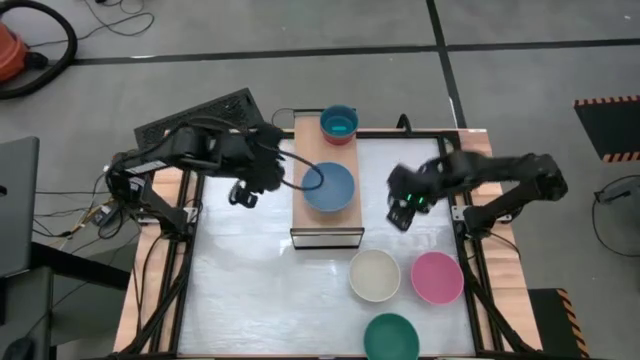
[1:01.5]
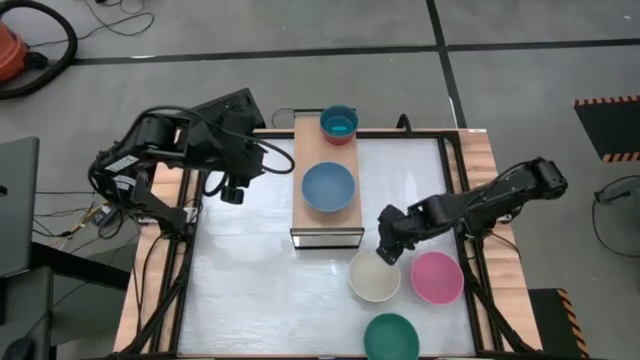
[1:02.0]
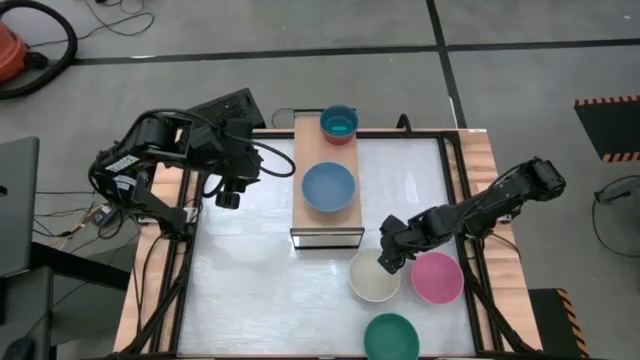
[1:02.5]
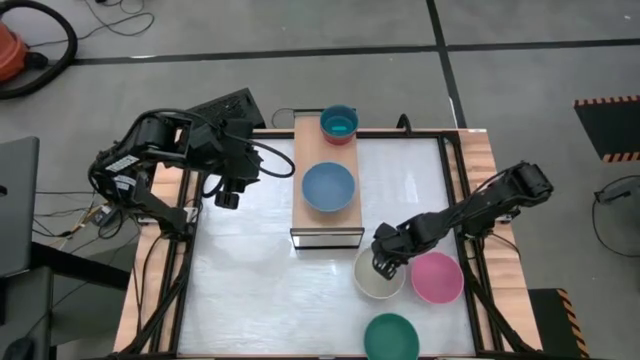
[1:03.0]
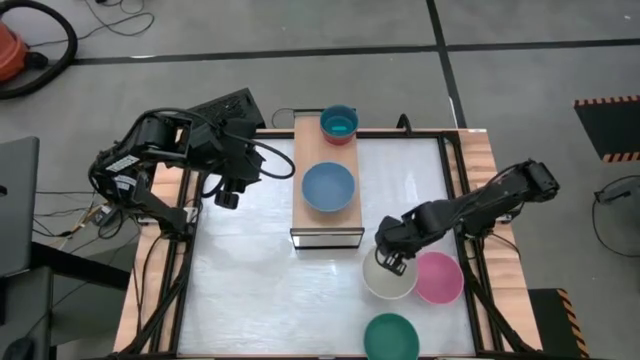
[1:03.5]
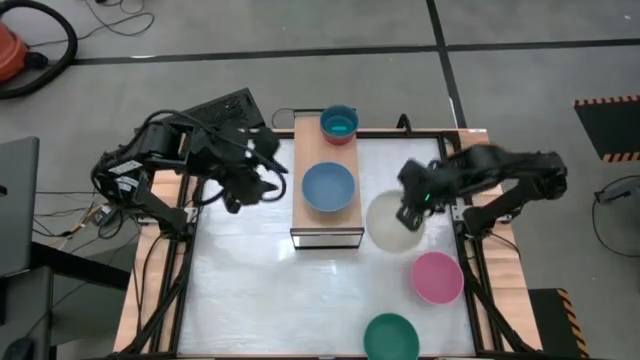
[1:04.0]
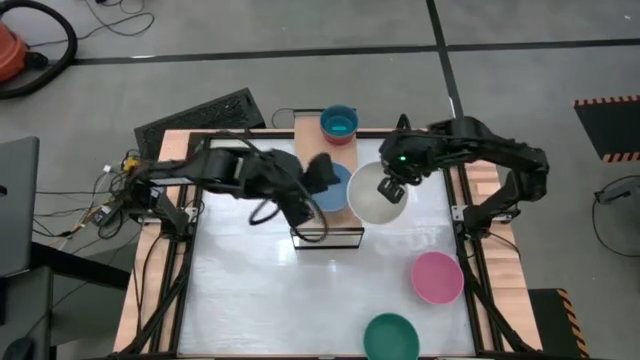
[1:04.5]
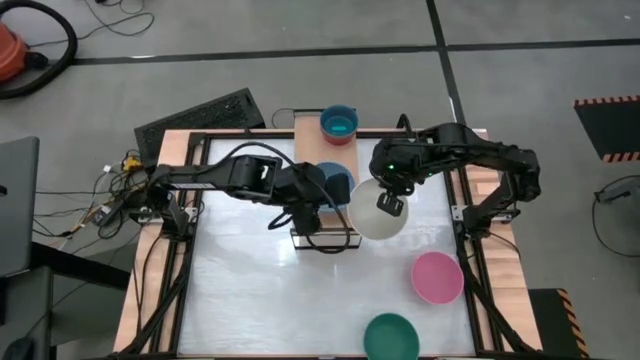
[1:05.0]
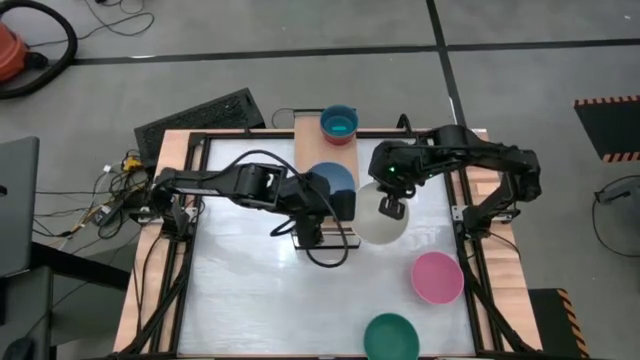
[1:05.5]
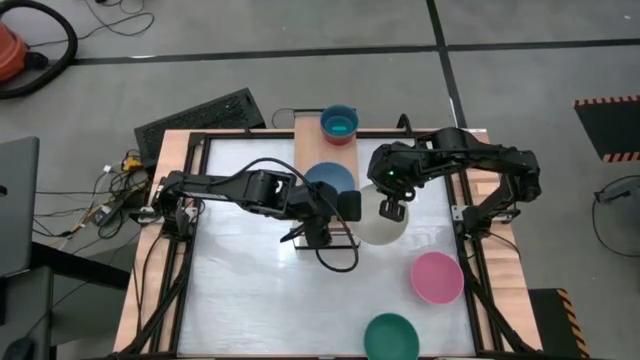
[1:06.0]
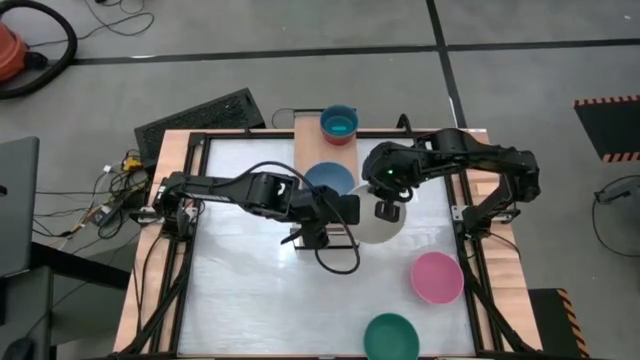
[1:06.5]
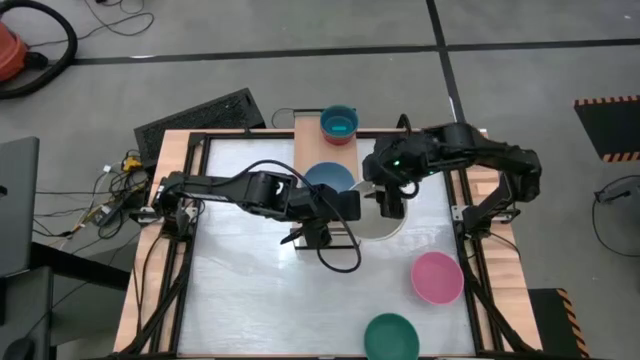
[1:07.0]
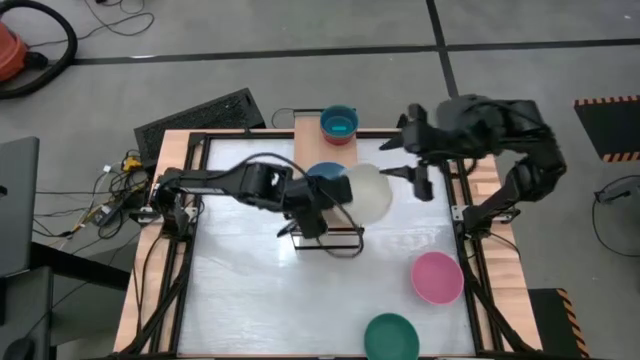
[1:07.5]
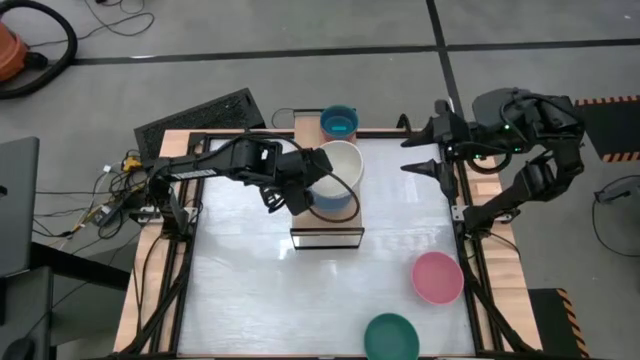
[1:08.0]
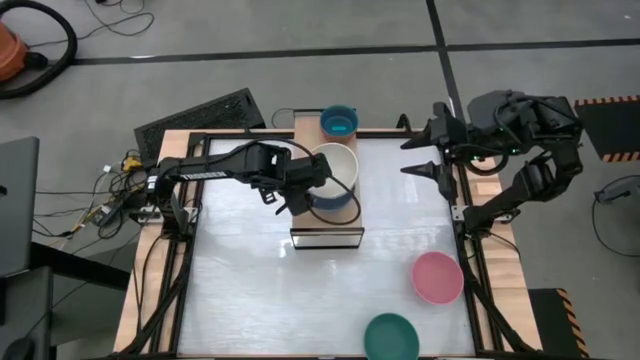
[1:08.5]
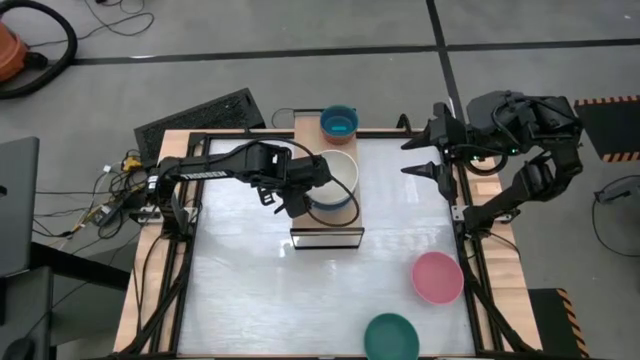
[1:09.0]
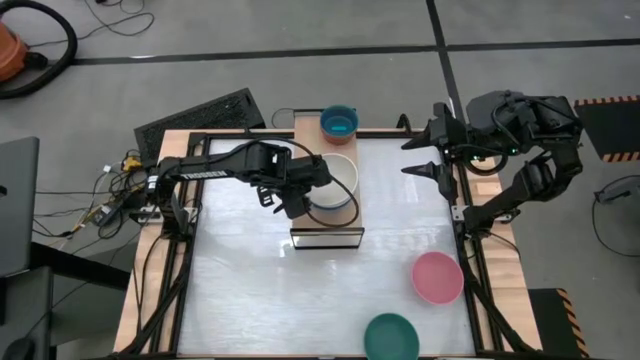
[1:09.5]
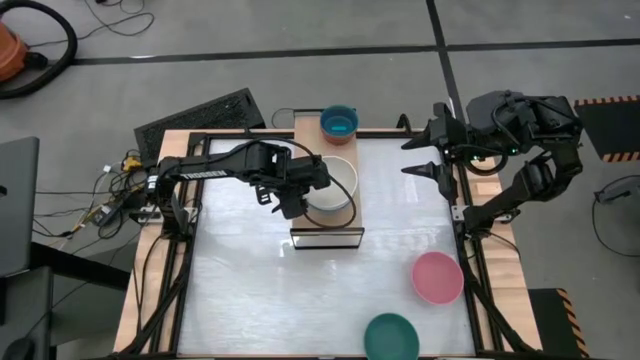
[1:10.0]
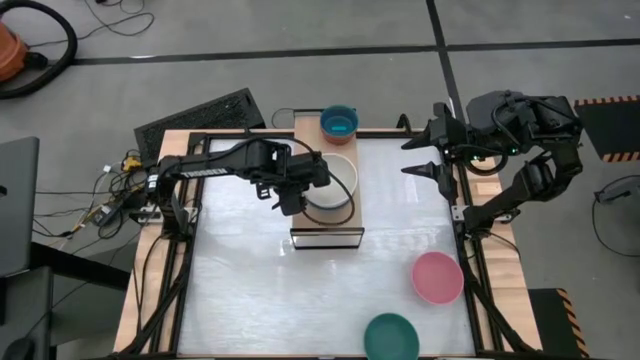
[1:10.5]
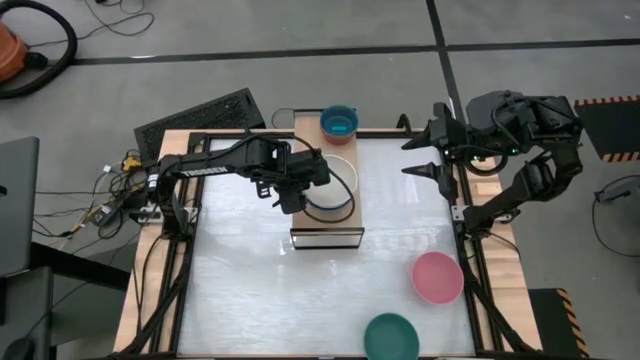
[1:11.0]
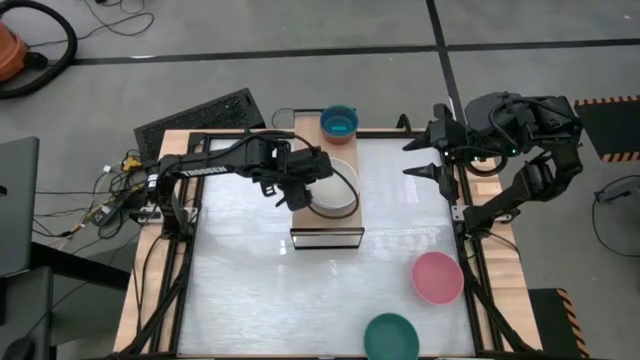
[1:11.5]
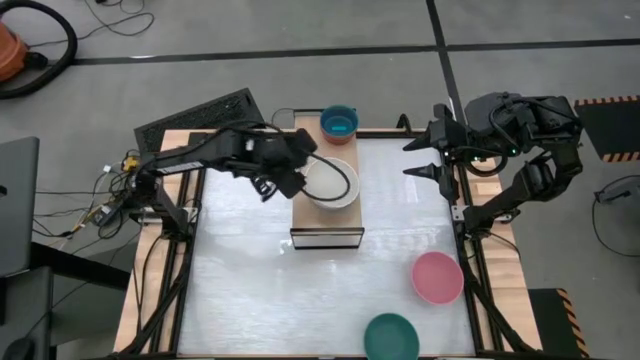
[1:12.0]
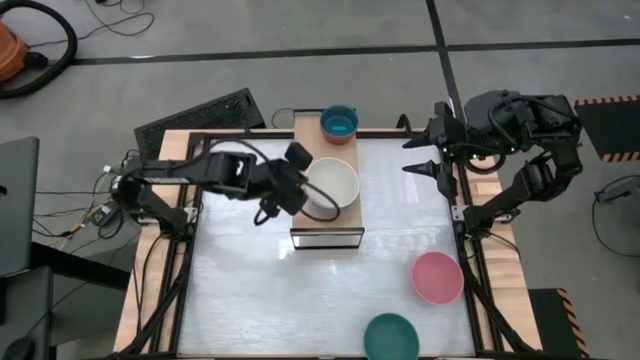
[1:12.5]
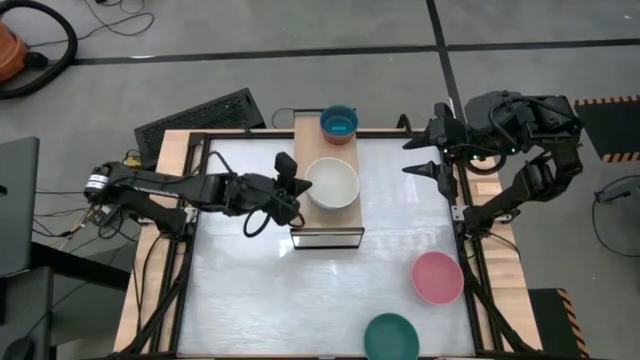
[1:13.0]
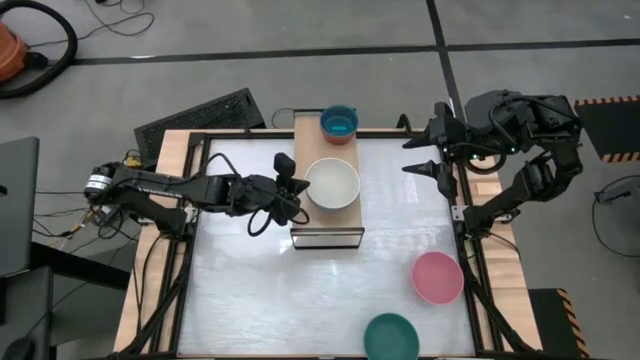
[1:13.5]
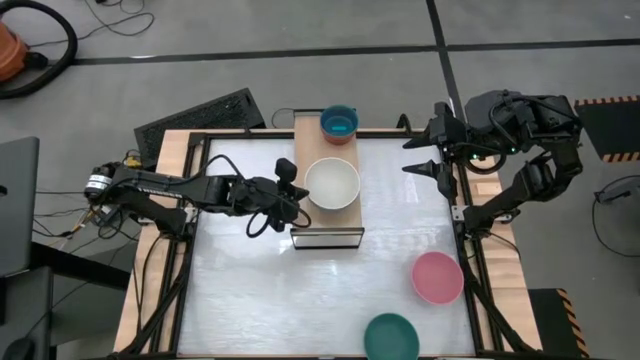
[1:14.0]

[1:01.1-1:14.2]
Task: Place and stack bowls onto a shelf
Stack the white bowl on top of the dark blue bowl on the shelf

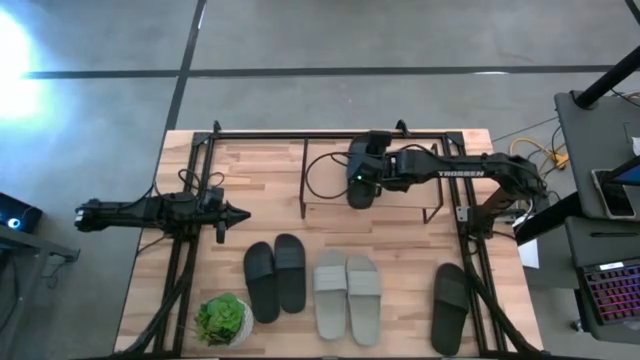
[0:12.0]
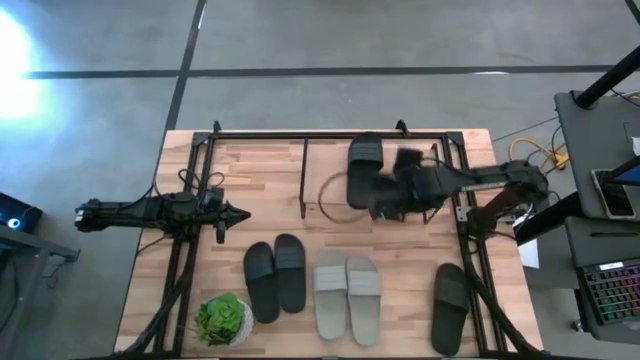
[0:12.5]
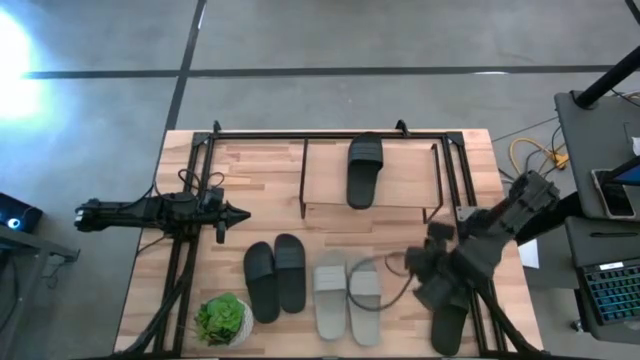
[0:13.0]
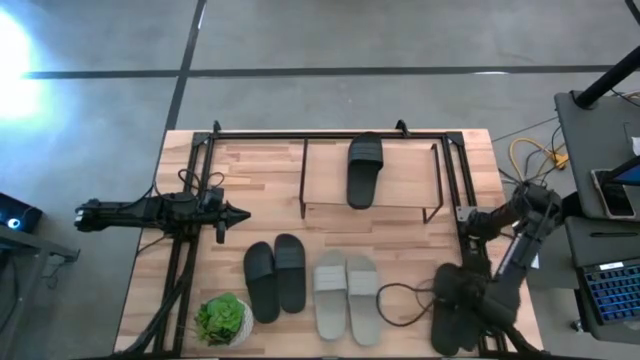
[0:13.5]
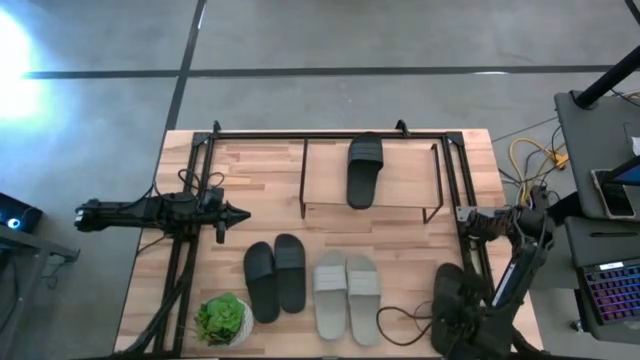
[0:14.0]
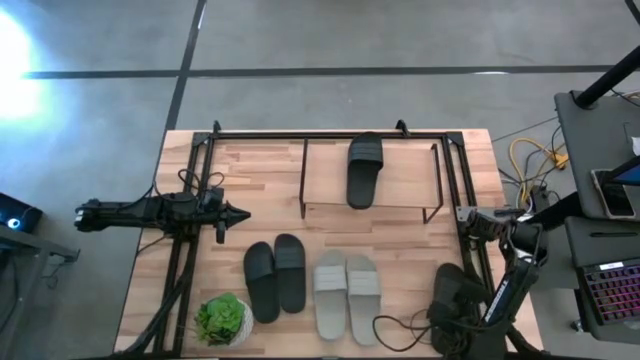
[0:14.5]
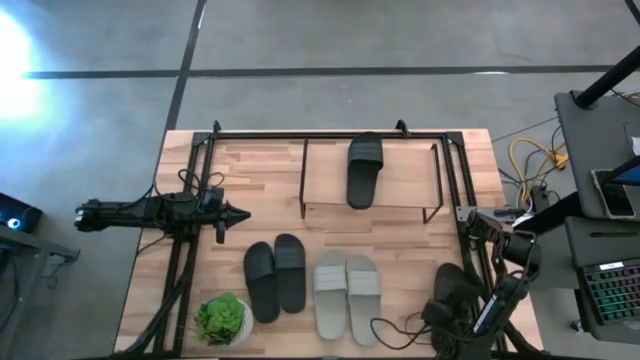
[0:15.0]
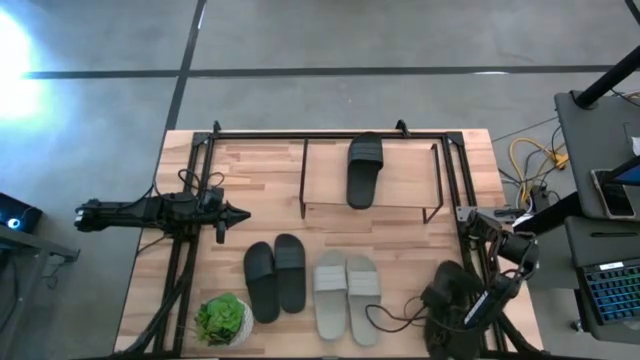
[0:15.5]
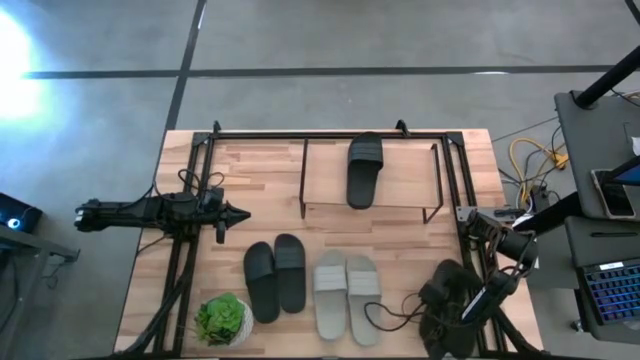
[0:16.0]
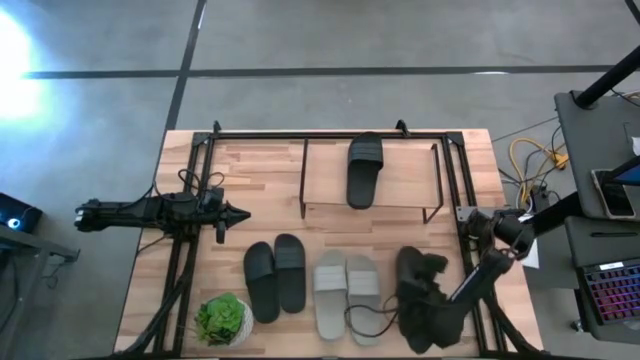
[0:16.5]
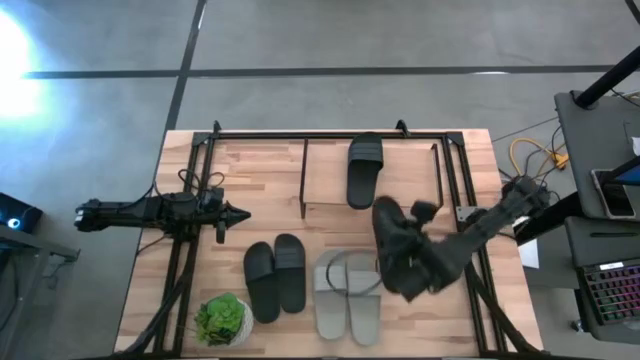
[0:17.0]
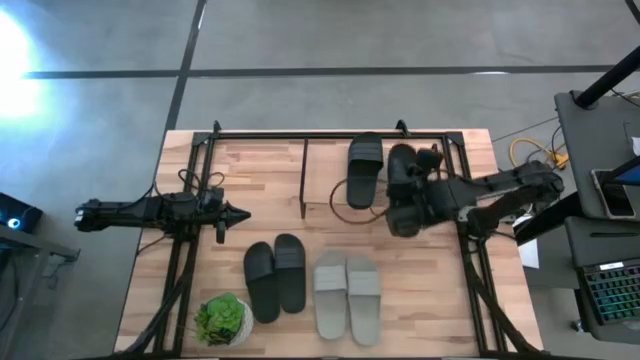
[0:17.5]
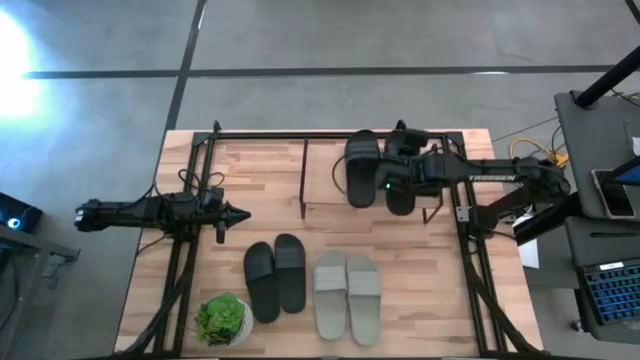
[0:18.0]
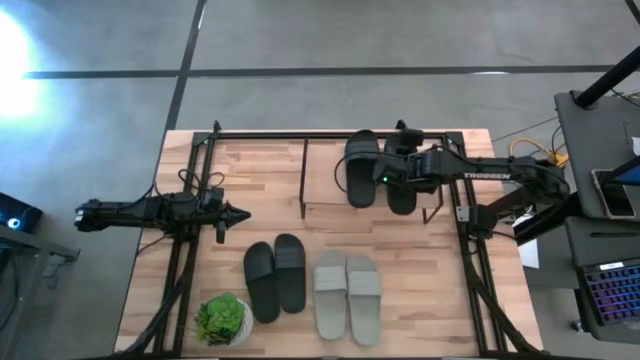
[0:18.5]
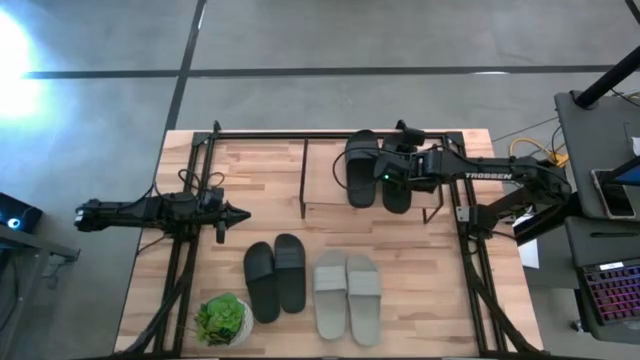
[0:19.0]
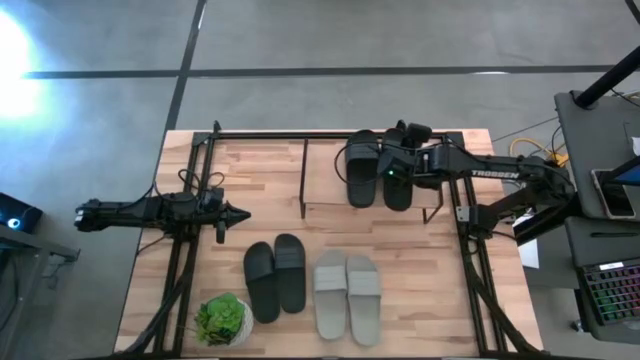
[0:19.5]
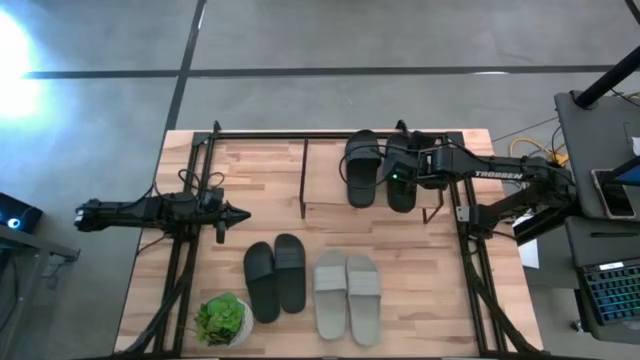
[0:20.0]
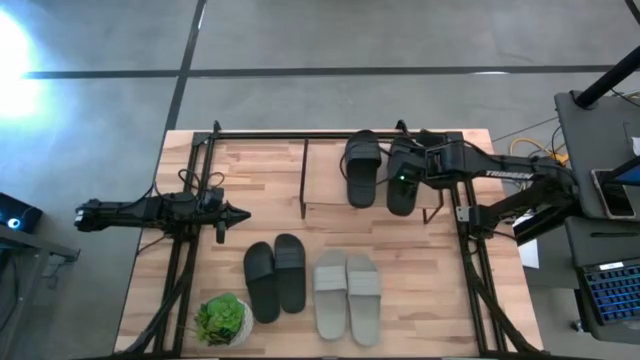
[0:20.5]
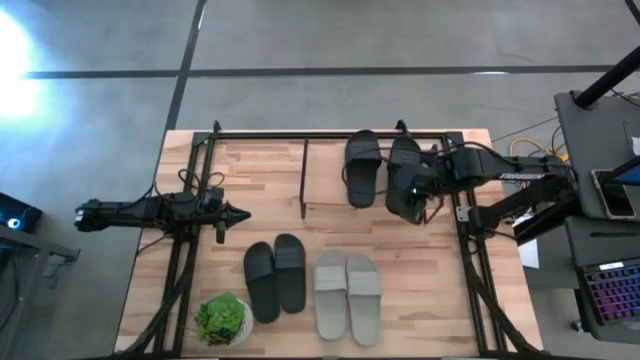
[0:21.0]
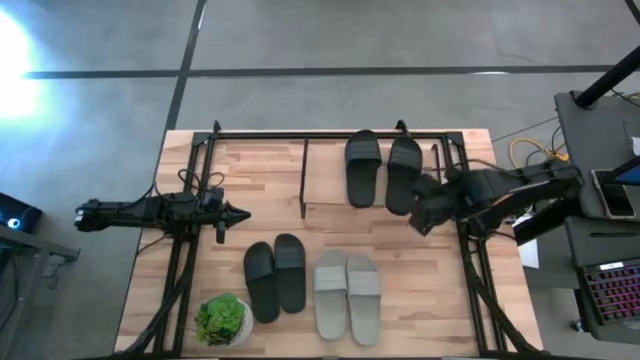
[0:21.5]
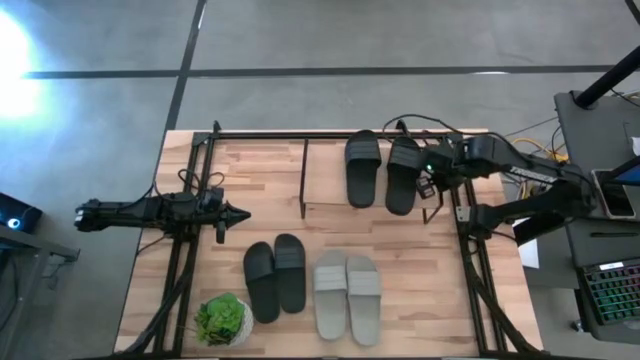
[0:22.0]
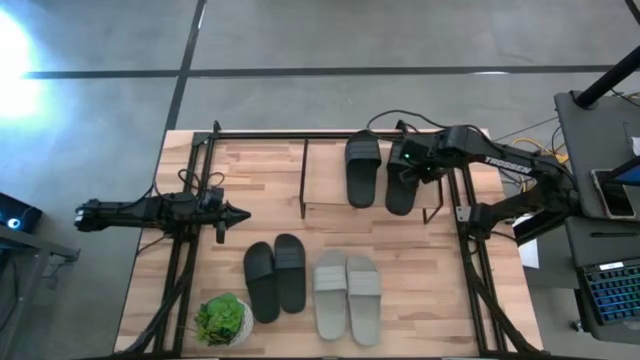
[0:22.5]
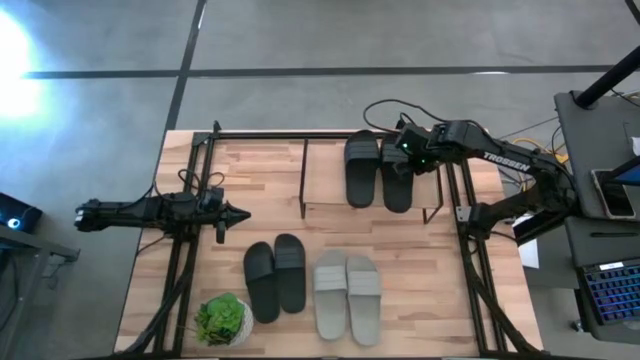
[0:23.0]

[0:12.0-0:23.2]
Task: Pick and place slides into the shelf
Put the black slide on the shelf
